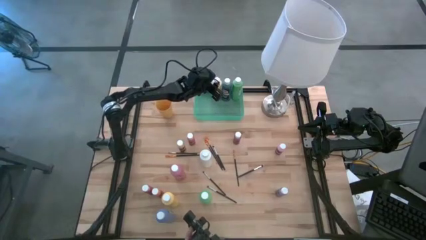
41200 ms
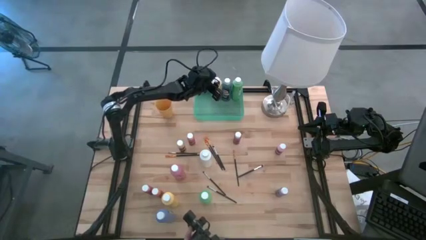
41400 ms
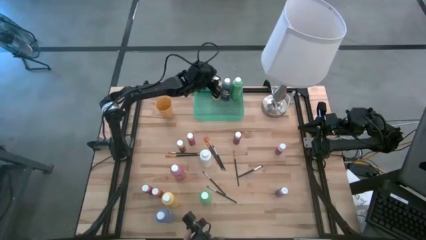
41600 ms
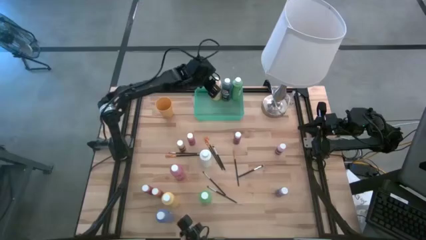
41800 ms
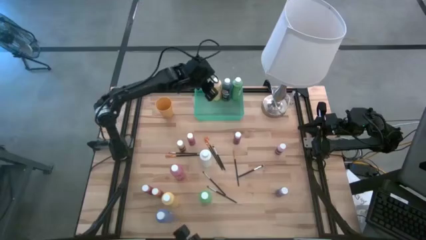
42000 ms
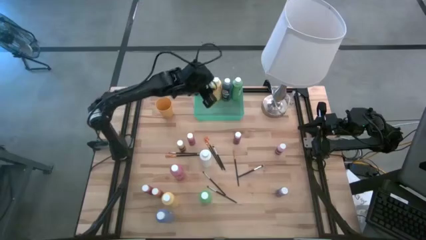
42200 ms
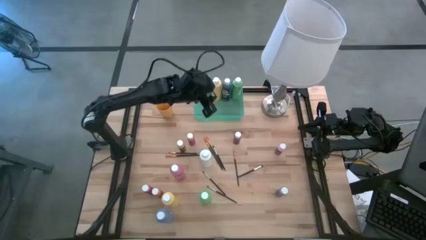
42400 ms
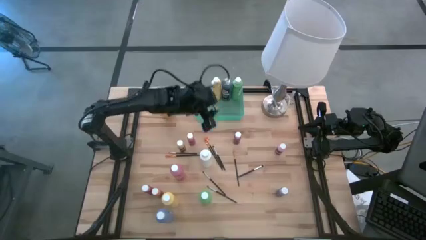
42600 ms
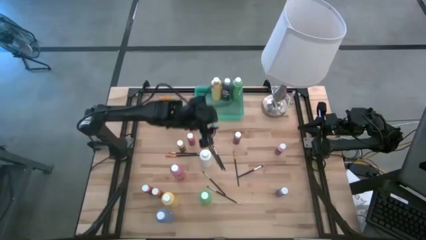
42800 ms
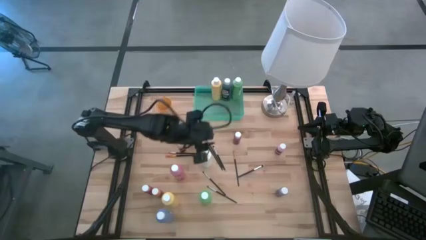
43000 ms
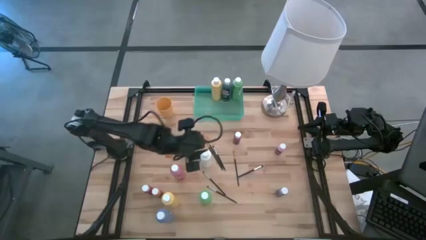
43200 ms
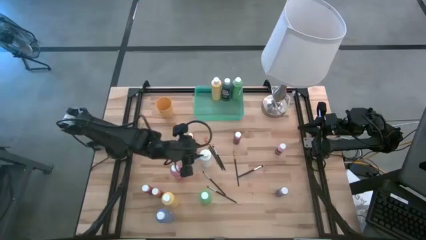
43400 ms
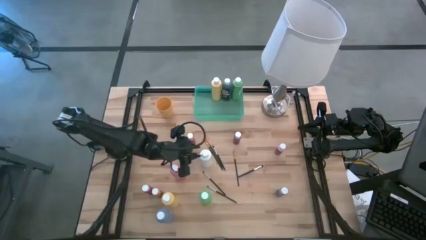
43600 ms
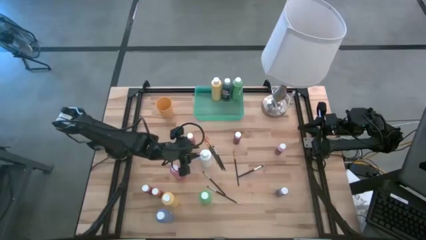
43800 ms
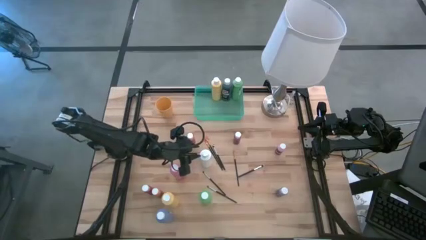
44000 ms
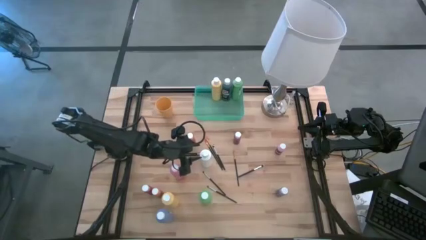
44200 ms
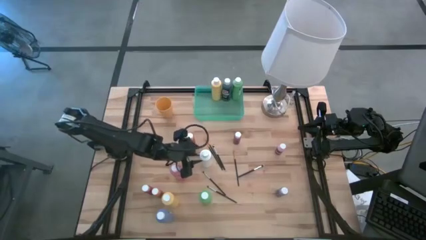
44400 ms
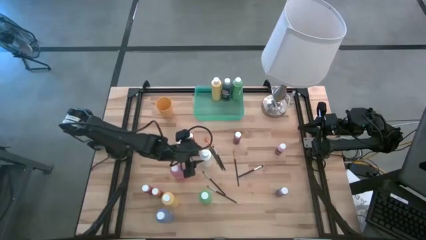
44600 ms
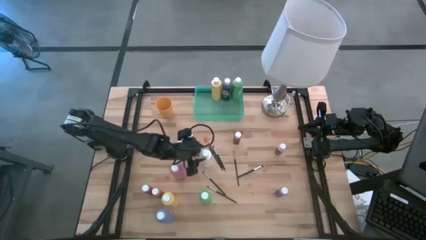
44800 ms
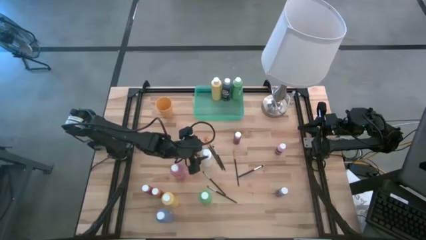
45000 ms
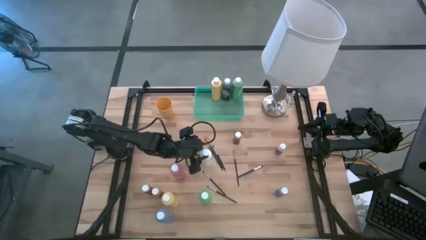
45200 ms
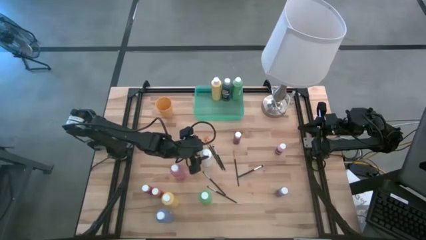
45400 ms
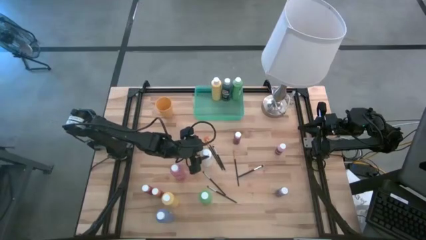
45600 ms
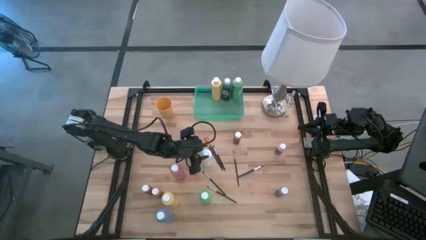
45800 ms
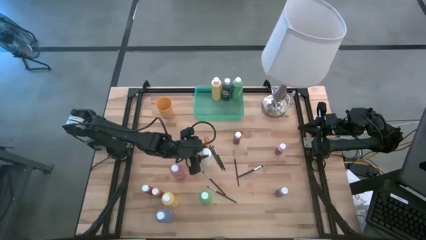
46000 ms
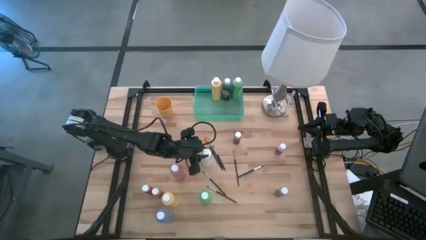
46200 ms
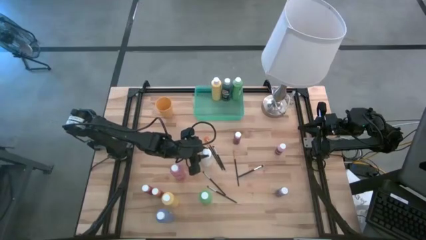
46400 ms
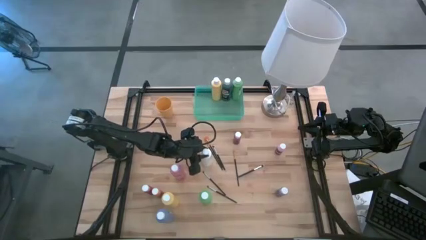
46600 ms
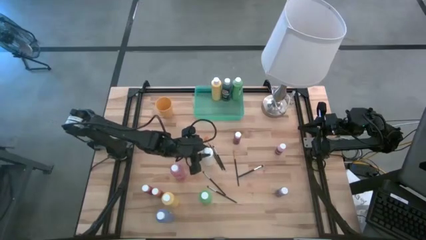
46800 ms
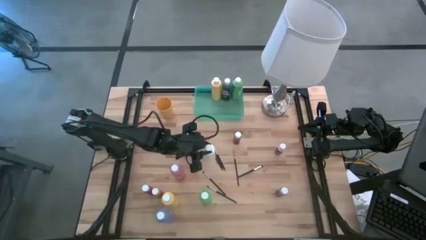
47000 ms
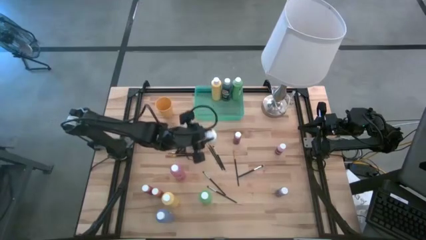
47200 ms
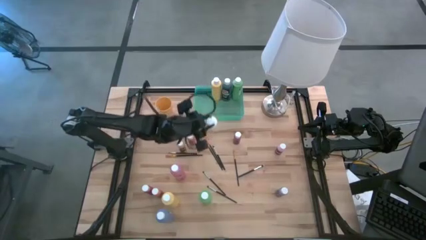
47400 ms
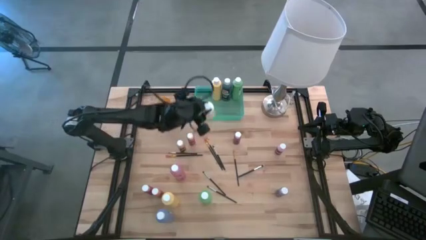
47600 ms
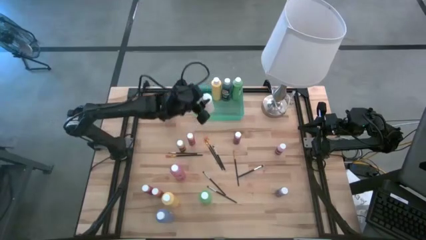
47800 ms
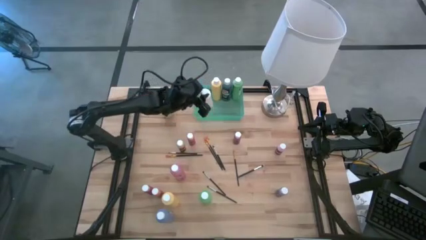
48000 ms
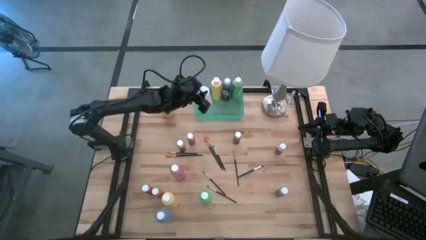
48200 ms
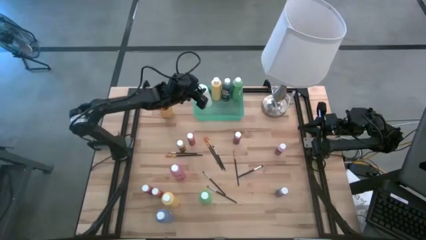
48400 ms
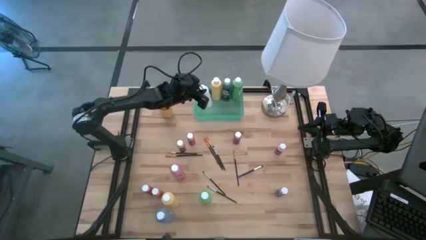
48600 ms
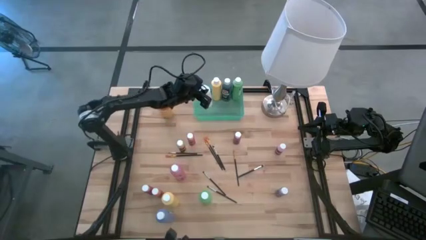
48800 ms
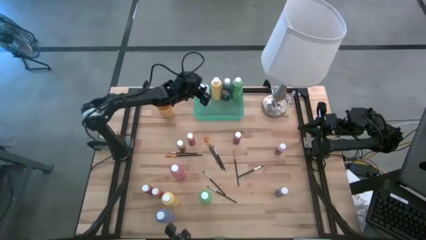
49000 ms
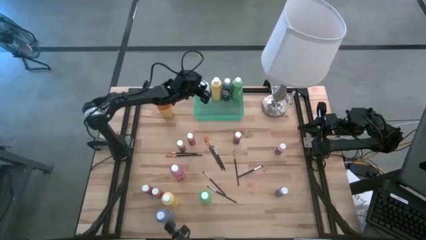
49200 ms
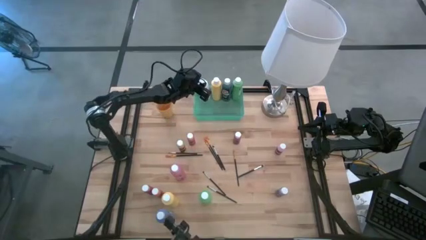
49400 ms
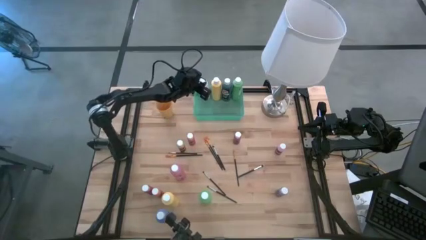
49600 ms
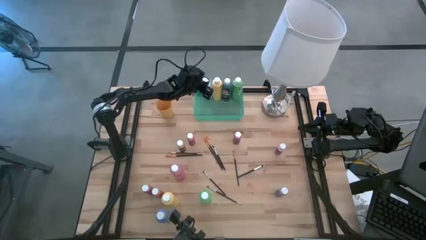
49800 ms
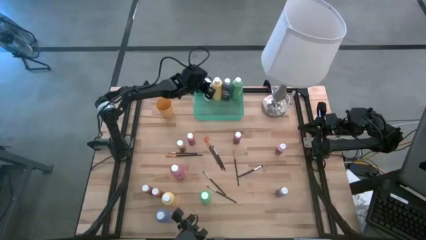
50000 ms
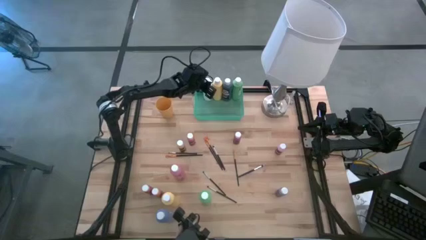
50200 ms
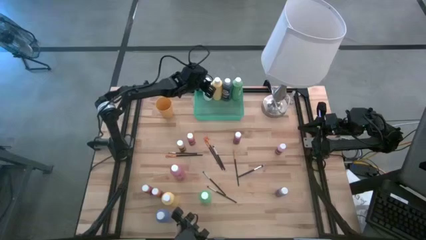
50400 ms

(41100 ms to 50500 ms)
Task: Pick & Place Paint Supplies
Put the large white paint bottle into the green bin

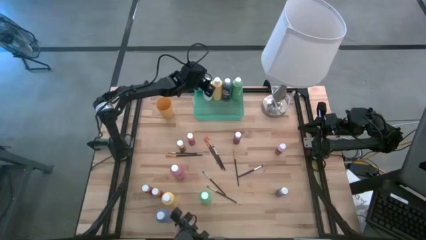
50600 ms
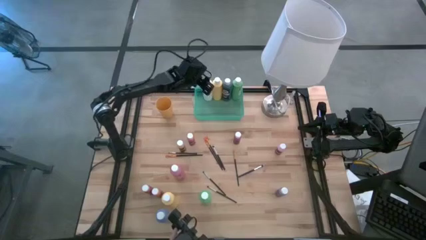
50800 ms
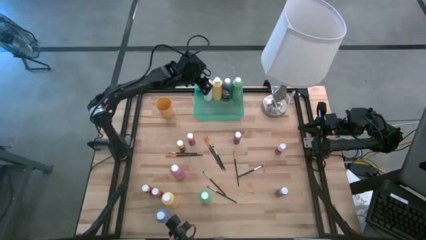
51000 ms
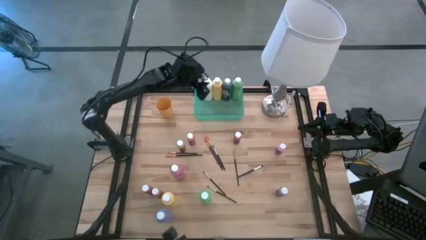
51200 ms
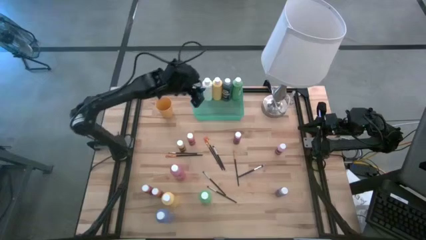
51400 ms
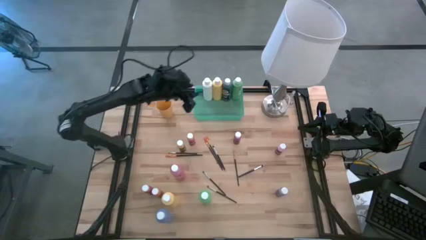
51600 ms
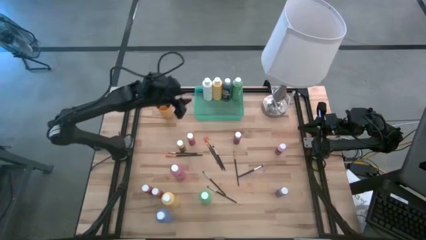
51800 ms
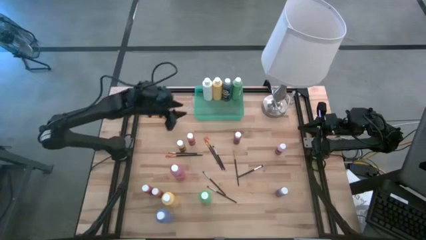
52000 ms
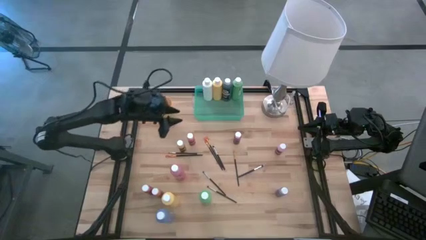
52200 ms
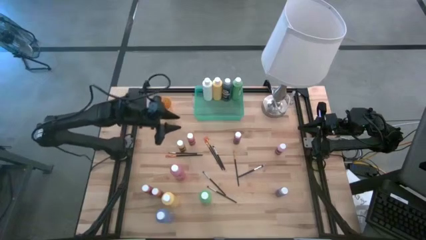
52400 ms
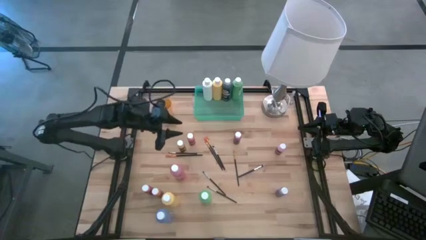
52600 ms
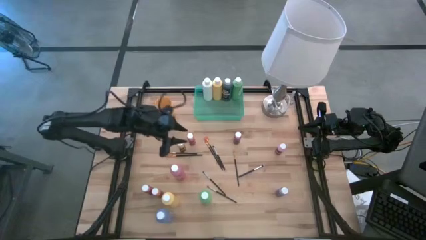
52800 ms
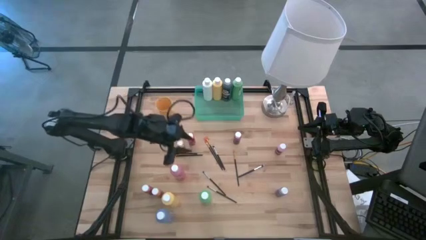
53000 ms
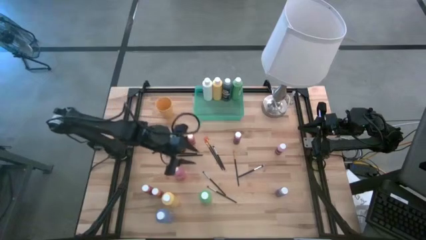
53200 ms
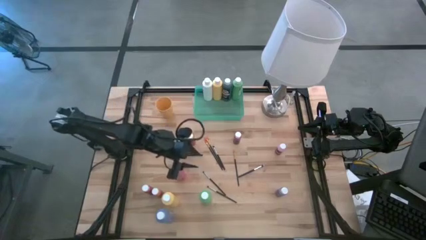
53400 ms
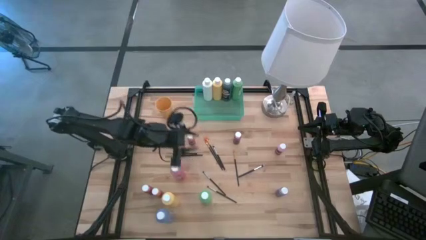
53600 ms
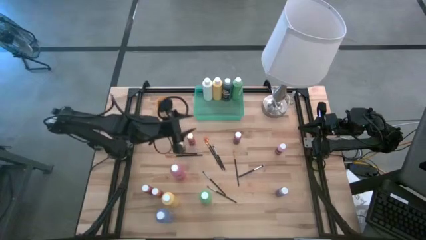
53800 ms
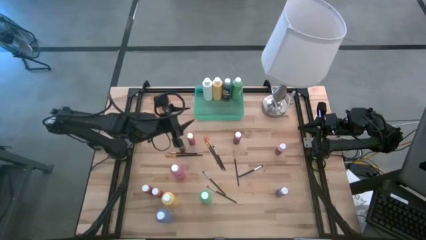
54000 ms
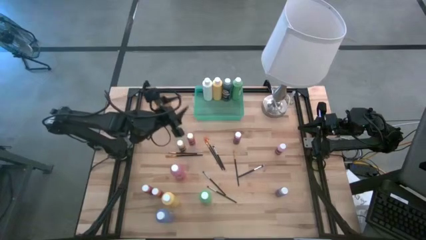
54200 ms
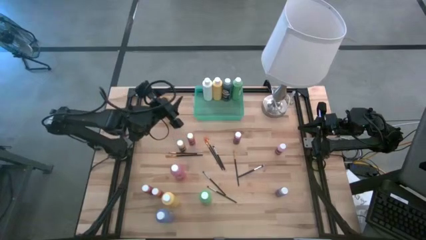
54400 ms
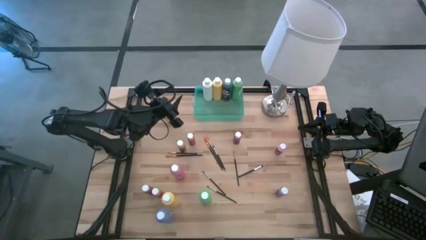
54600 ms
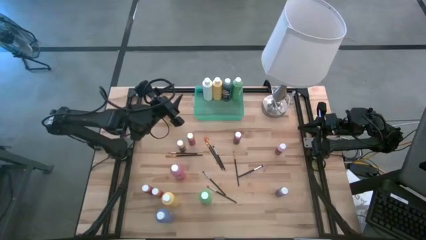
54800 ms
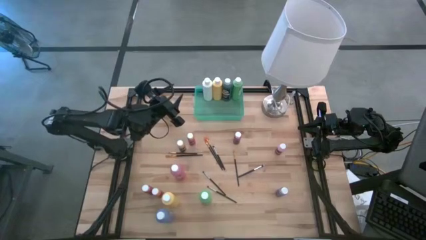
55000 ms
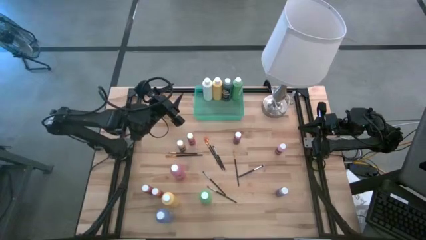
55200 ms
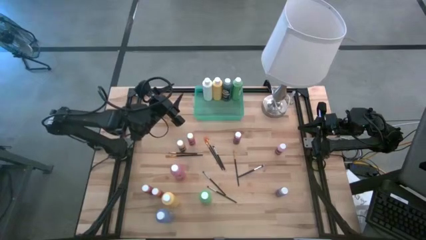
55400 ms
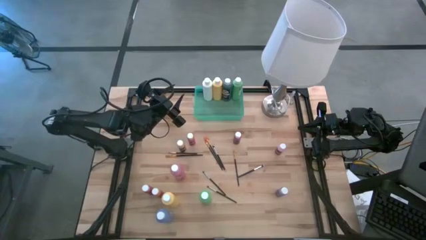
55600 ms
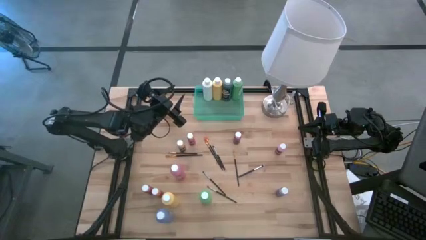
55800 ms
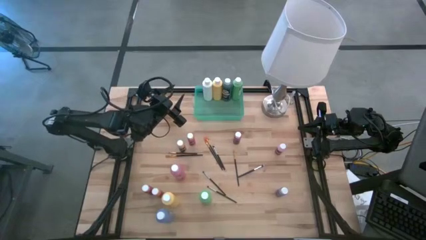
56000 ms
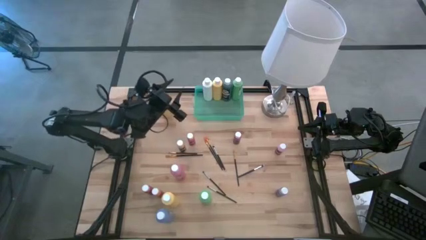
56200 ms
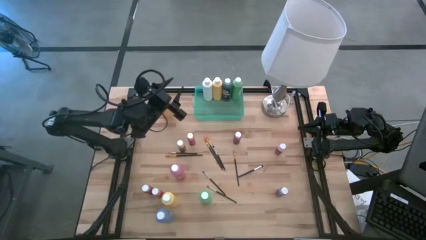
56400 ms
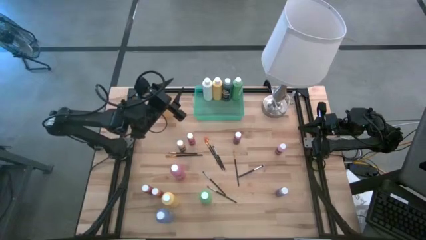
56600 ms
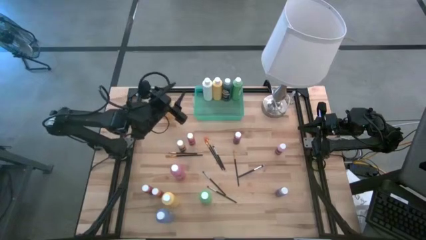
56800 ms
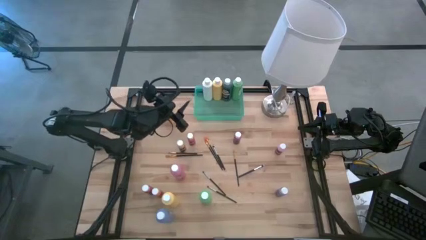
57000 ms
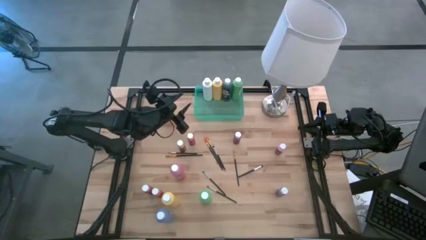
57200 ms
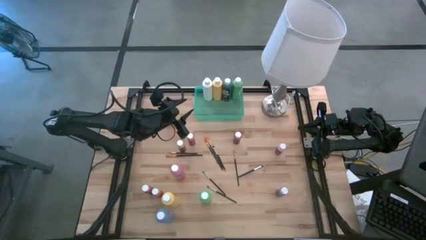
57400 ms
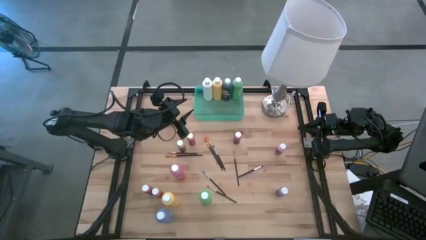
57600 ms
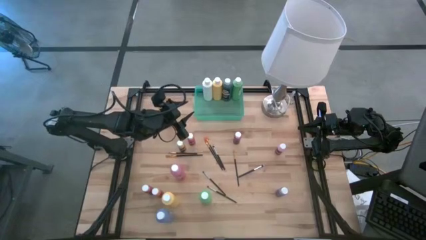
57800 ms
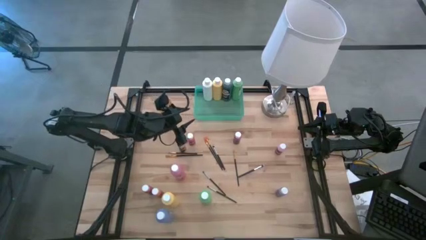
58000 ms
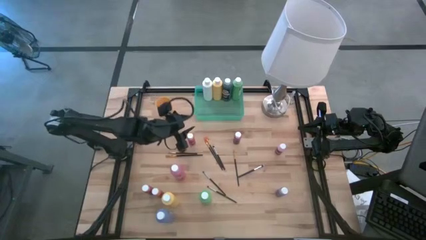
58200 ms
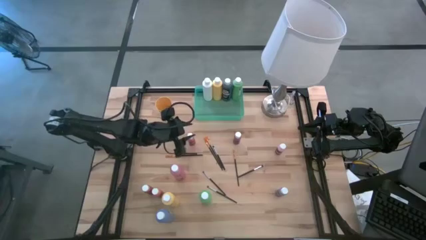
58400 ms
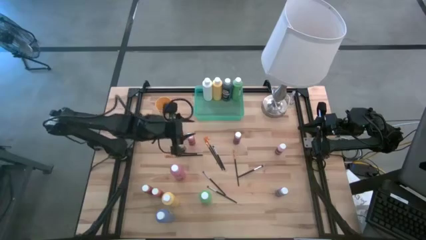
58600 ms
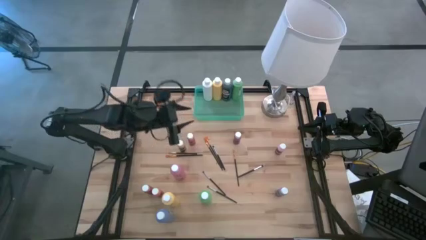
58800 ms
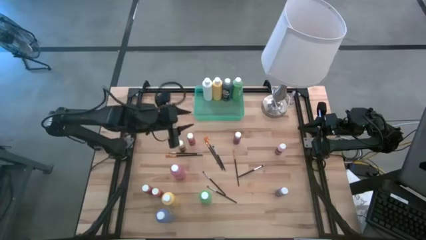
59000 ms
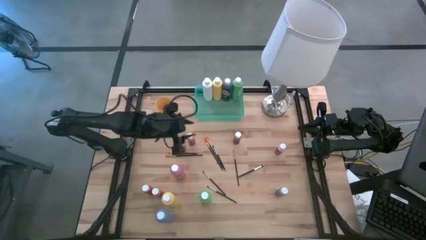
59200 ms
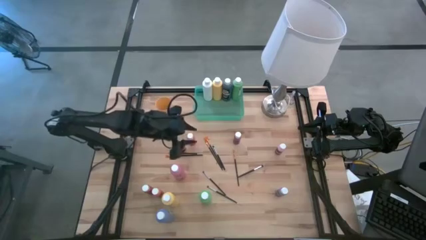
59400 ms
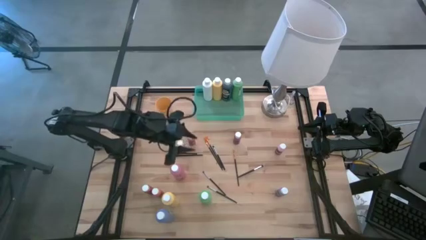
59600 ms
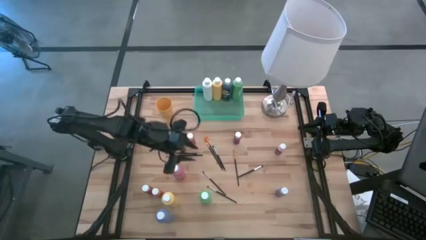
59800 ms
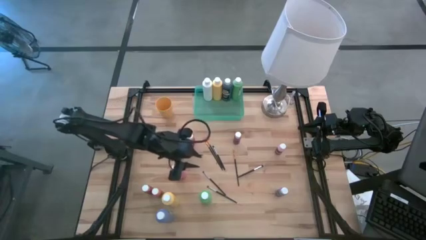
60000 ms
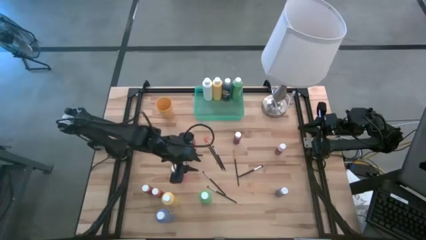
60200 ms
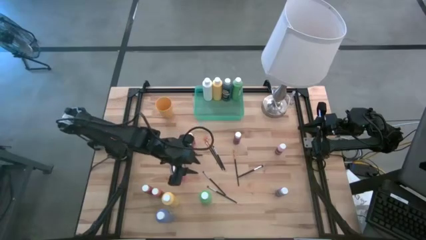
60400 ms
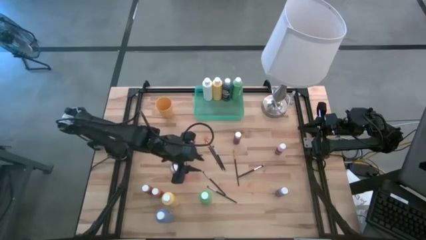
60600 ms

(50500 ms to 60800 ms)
Put the large green paint bottle into the green bin
